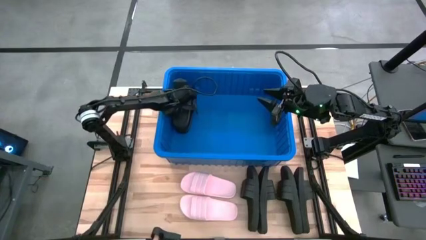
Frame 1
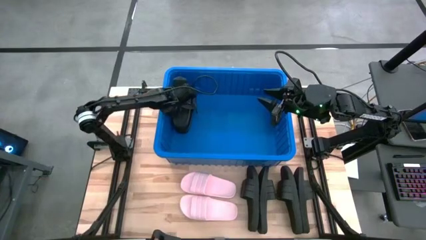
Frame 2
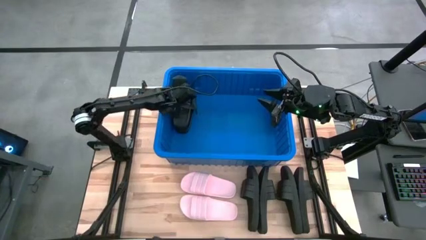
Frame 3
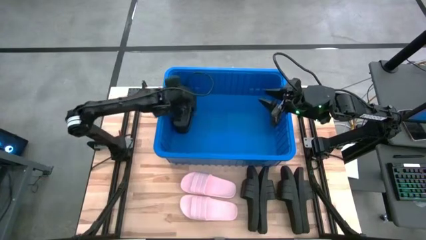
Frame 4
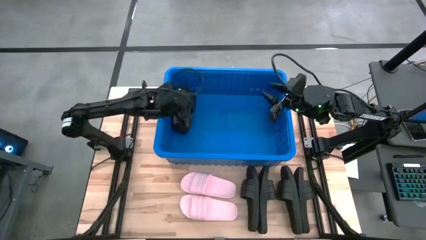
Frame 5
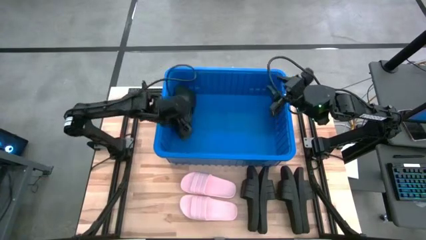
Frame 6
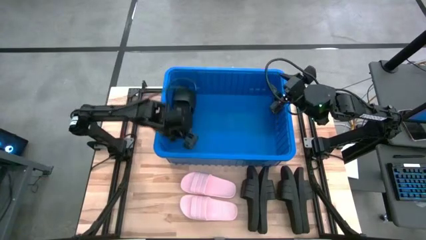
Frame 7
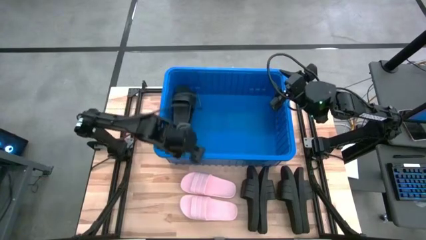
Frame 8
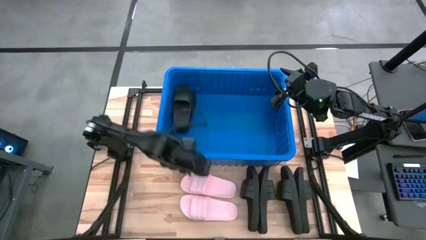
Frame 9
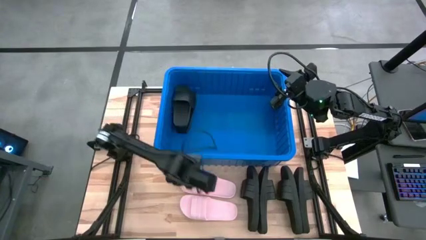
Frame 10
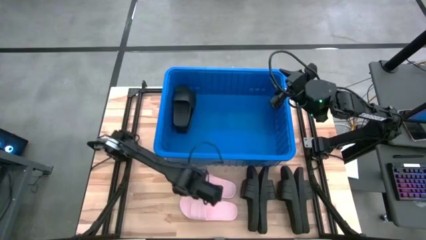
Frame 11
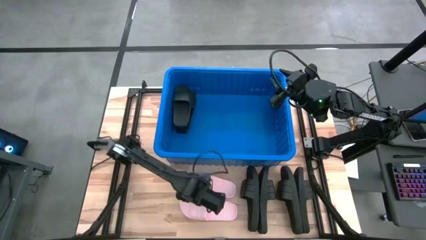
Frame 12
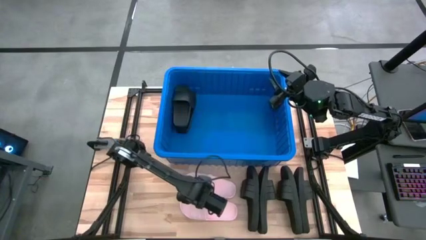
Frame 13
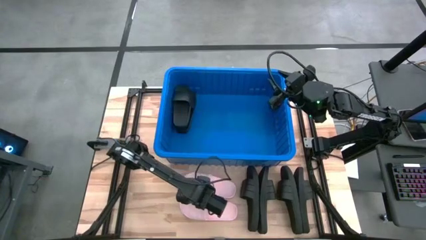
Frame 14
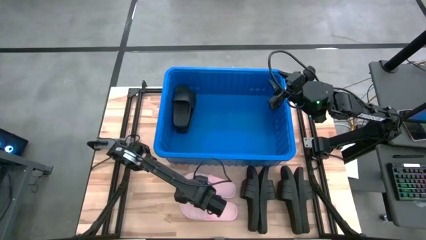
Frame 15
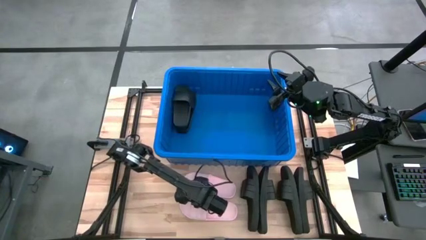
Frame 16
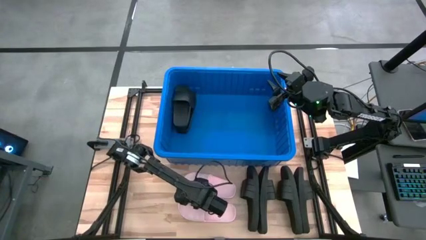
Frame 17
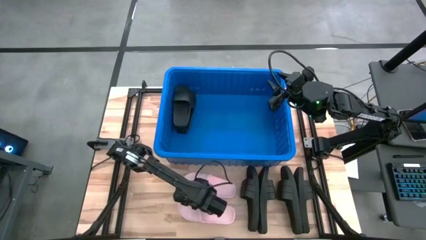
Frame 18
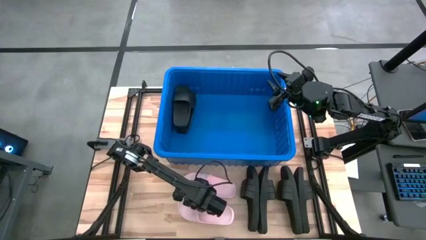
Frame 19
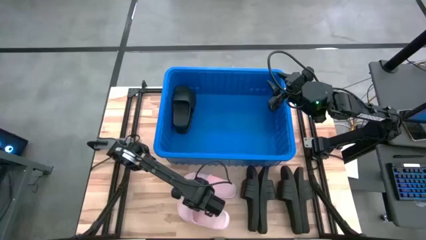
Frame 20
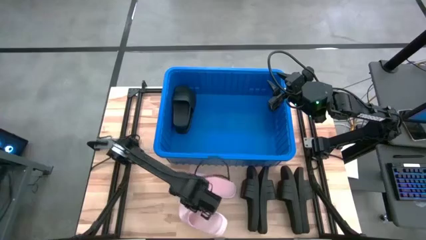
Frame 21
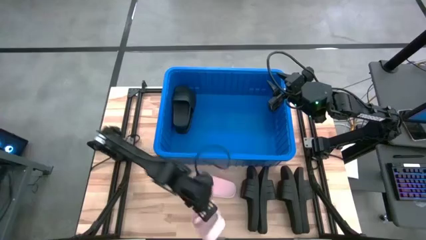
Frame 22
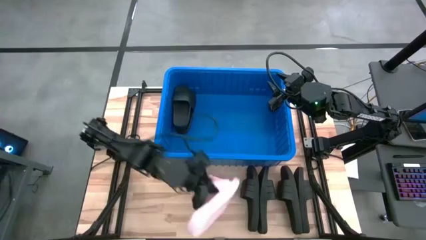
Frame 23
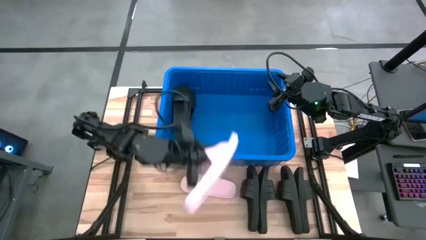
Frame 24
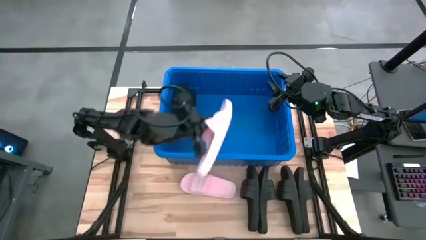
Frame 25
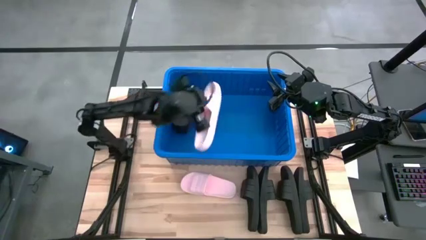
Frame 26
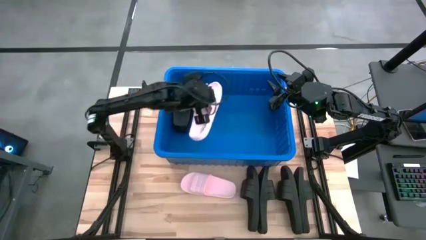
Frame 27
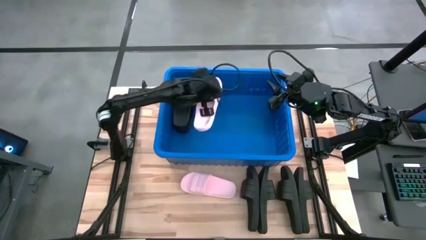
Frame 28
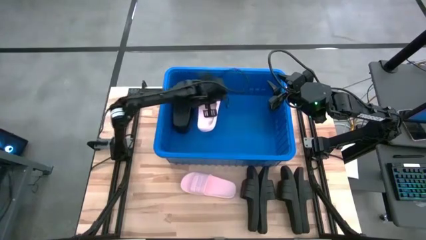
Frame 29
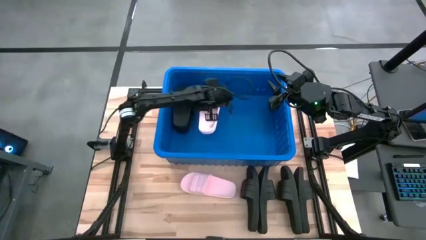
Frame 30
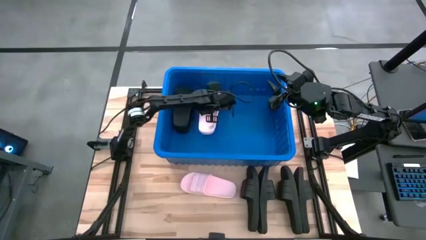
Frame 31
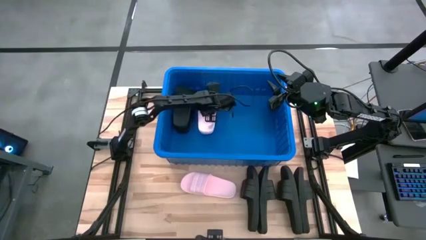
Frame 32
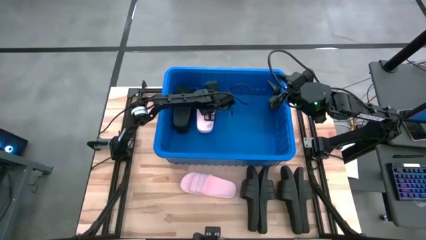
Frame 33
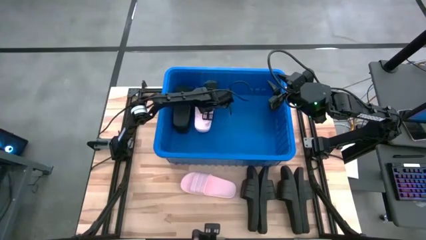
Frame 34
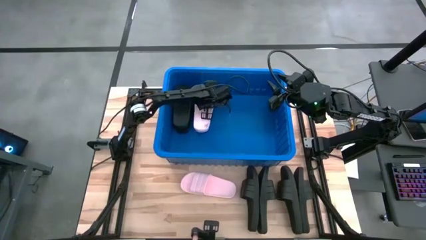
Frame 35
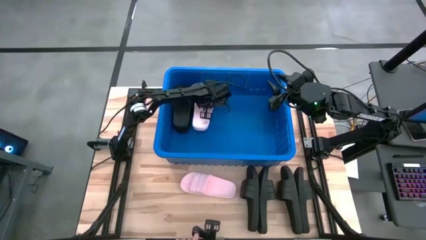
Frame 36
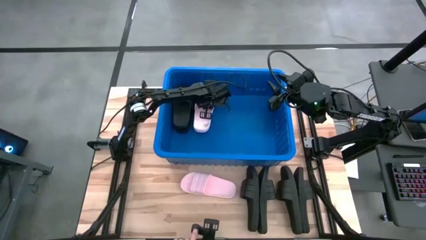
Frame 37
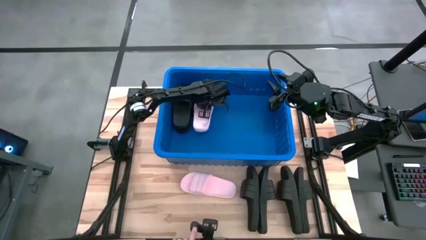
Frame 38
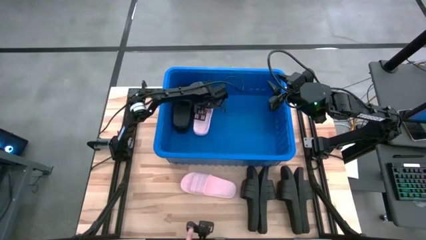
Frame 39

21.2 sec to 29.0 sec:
Task: Pick and place slides into bin
Put the pink slipper into the blue container

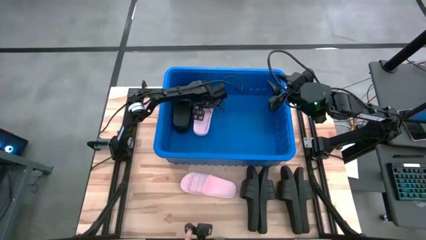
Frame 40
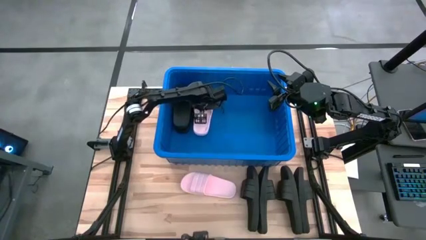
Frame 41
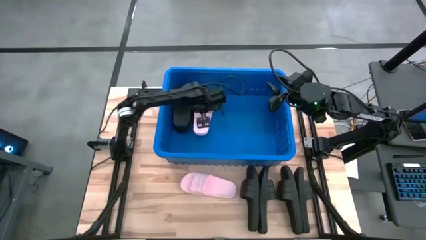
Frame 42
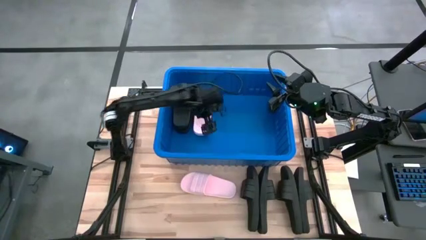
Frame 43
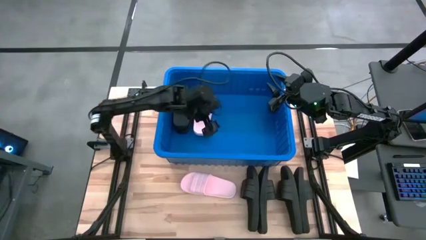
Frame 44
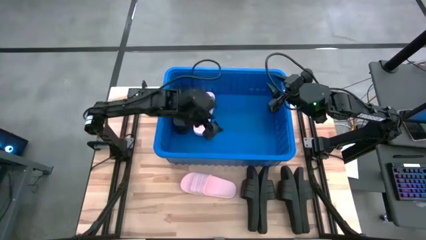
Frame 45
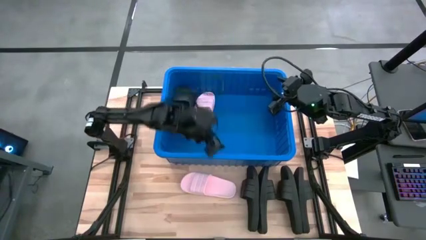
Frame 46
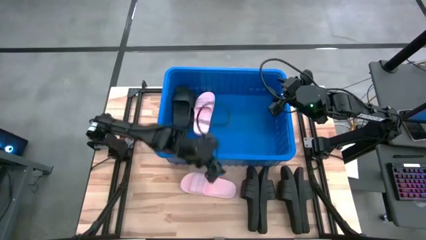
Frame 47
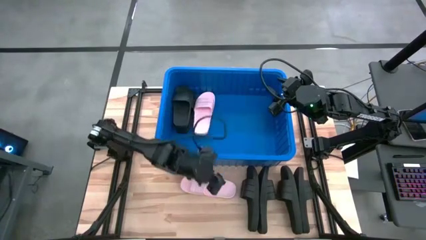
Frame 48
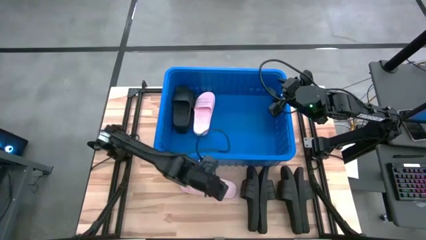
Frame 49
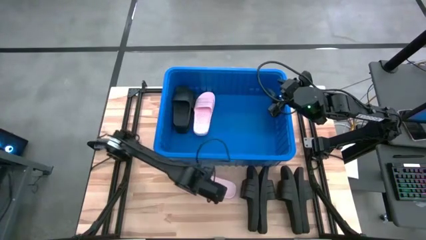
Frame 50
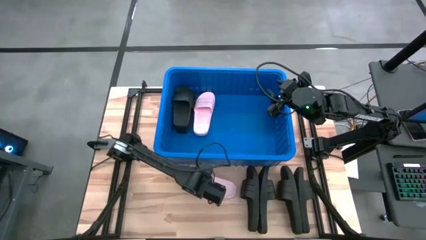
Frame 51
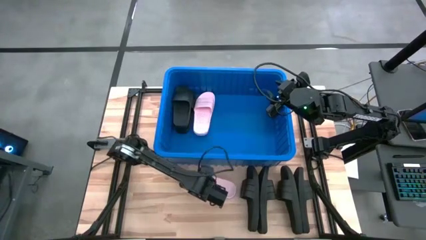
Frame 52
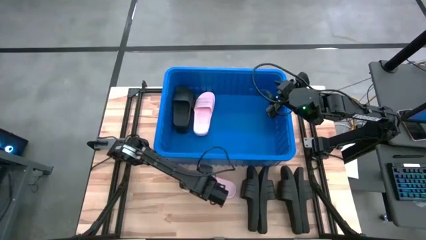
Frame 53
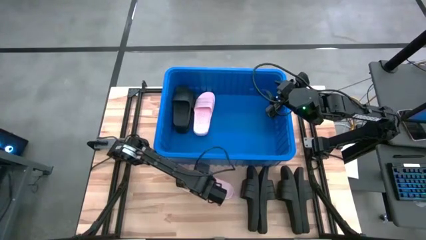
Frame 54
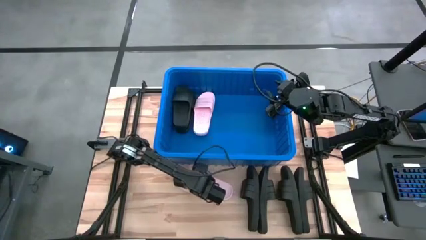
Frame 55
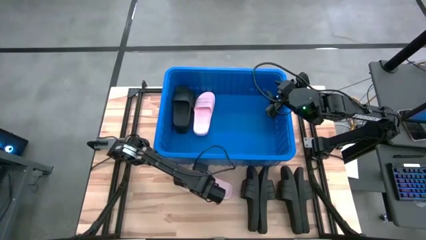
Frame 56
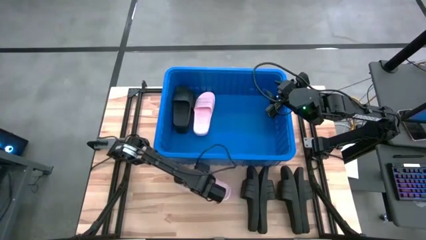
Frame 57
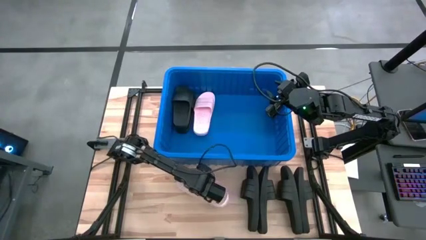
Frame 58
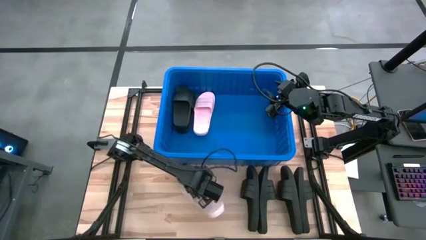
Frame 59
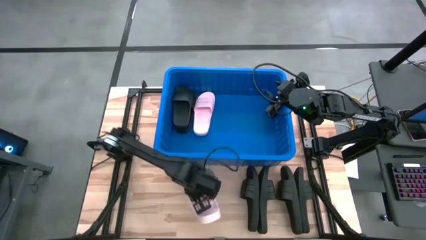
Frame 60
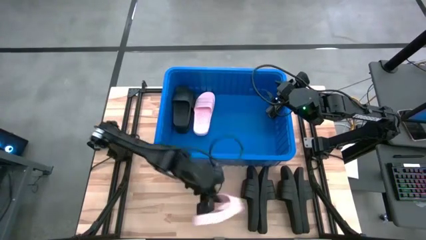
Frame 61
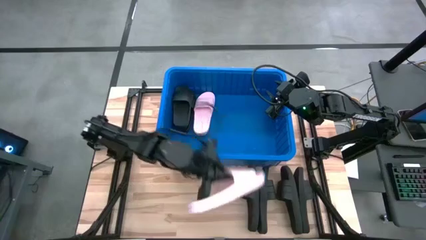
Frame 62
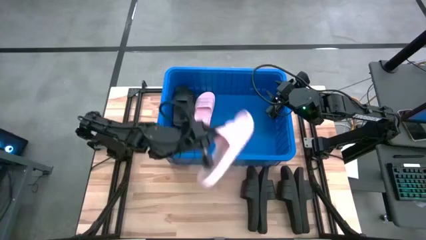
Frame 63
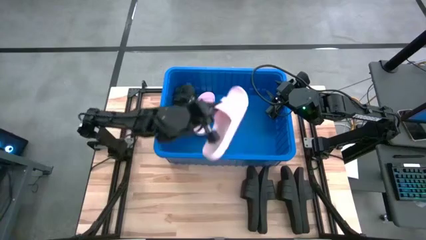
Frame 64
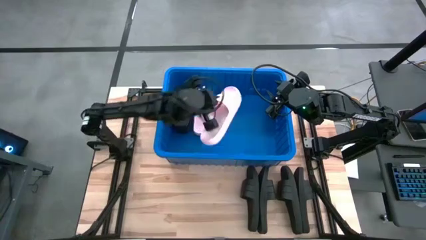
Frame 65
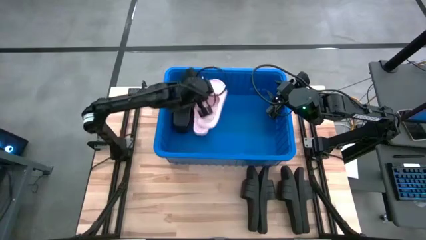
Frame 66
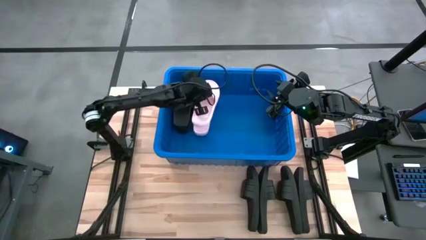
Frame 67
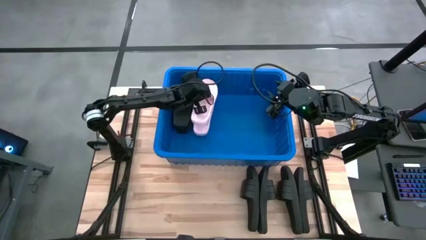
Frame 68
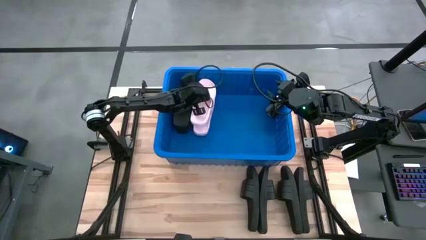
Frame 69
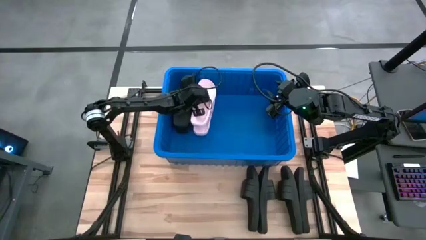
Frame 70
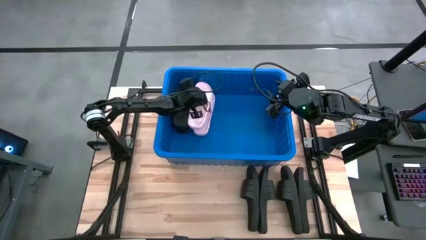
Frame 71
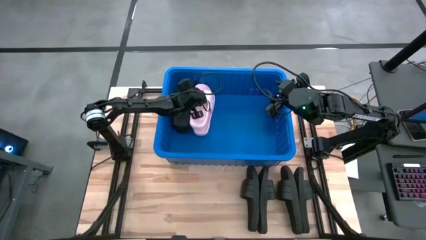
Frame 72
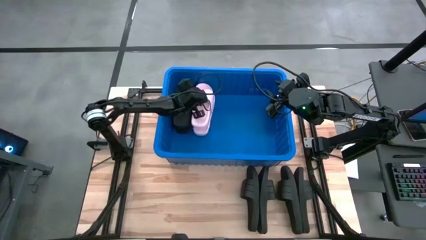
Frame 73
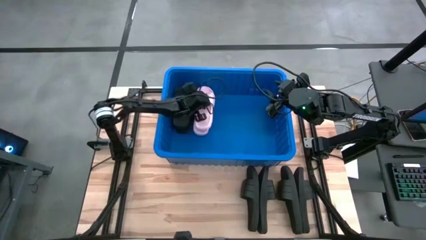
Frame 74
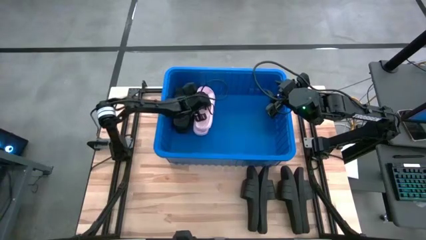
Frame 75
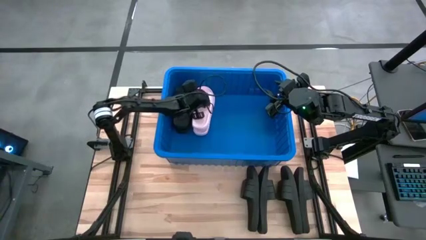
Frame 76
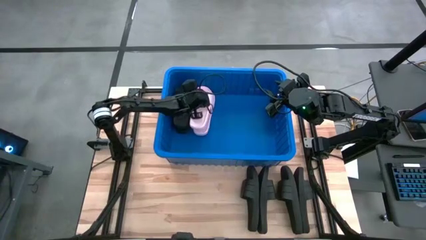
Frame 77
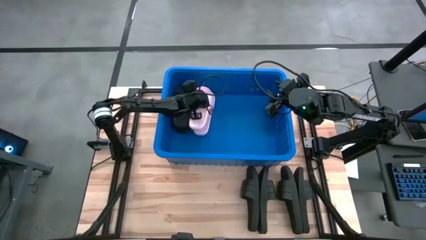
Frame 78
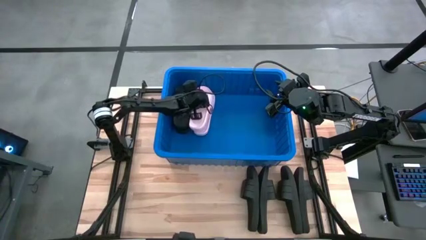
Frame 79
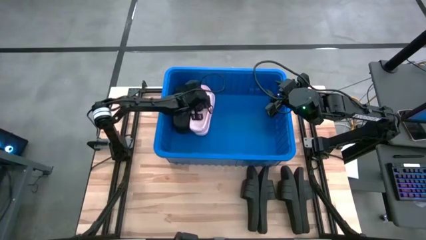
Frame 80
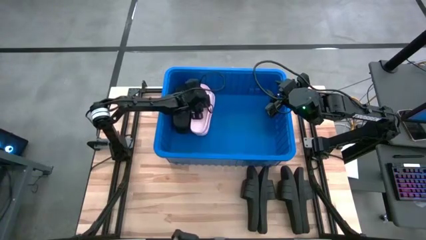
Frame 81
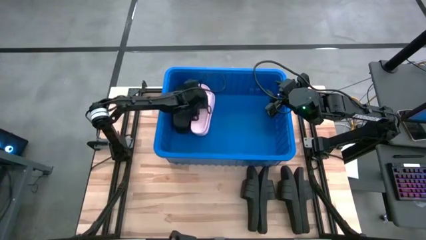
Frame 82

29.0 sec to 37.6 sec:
Put the pink slipper into the blue container
